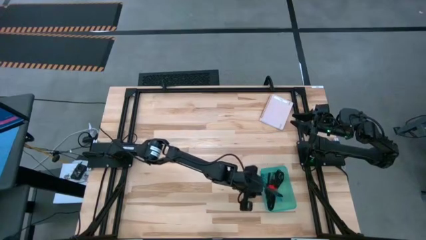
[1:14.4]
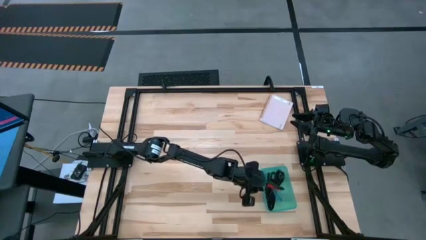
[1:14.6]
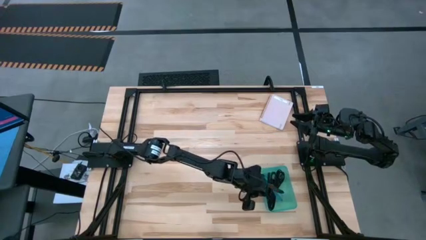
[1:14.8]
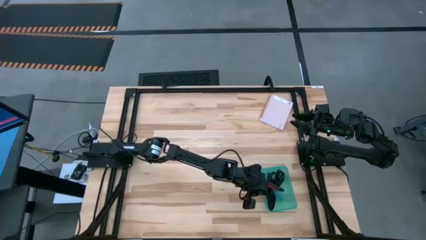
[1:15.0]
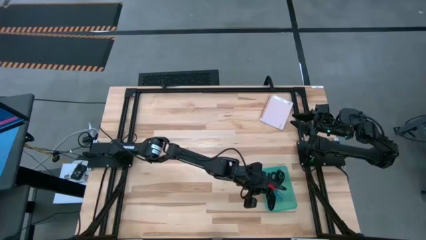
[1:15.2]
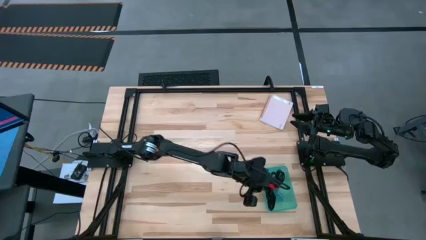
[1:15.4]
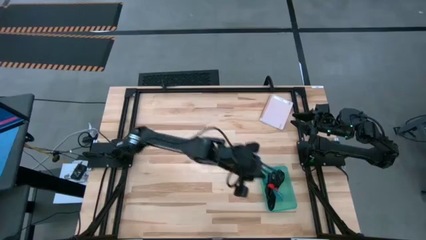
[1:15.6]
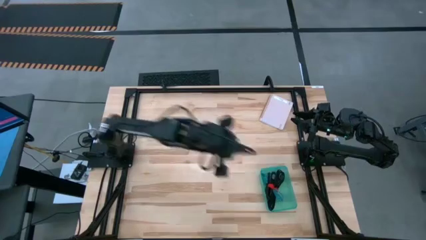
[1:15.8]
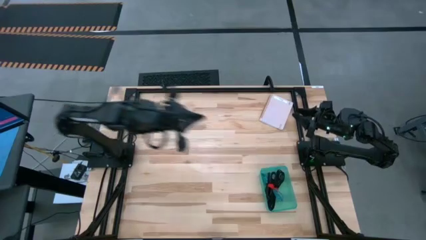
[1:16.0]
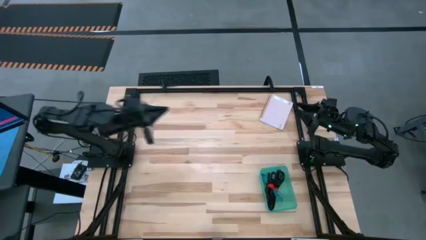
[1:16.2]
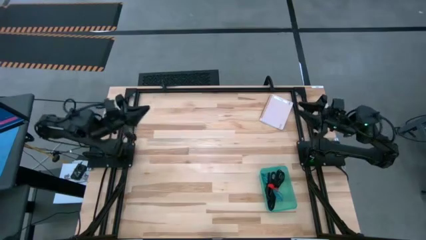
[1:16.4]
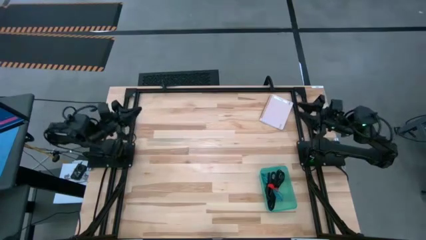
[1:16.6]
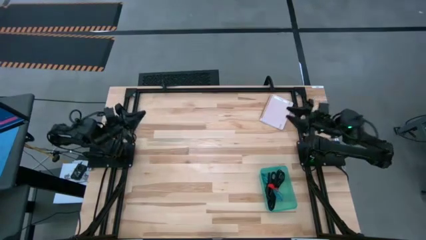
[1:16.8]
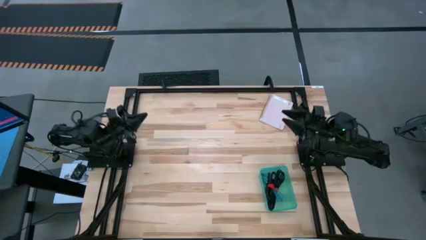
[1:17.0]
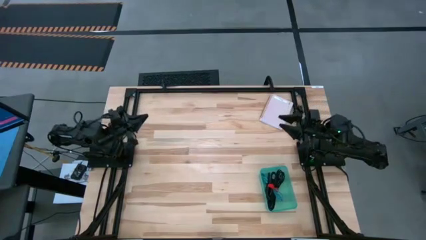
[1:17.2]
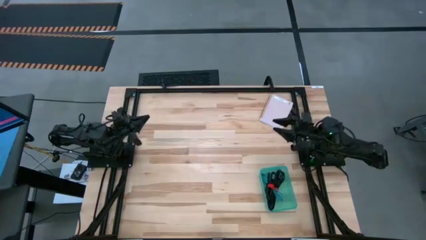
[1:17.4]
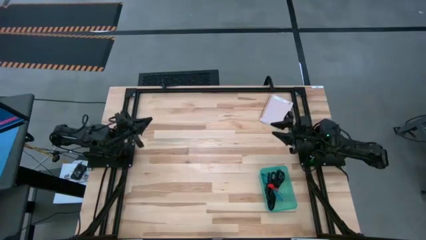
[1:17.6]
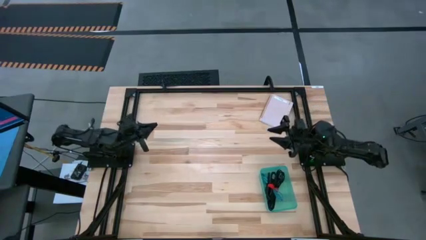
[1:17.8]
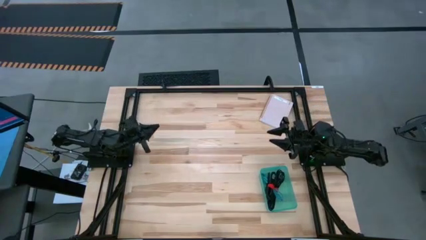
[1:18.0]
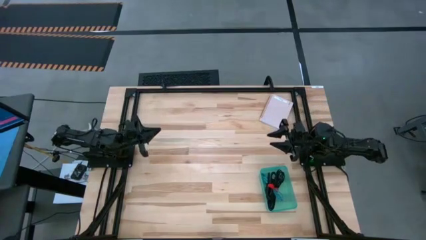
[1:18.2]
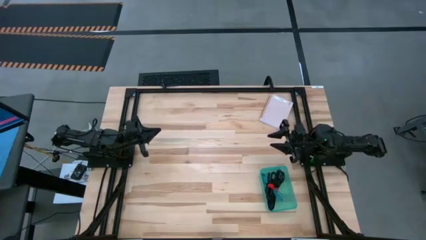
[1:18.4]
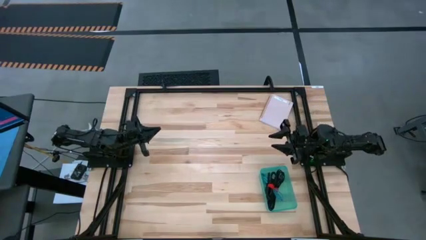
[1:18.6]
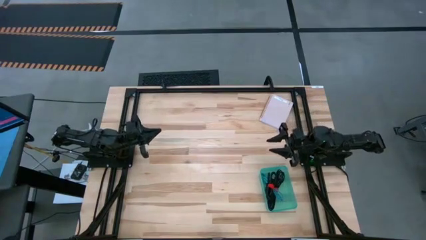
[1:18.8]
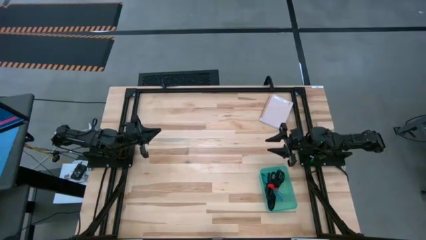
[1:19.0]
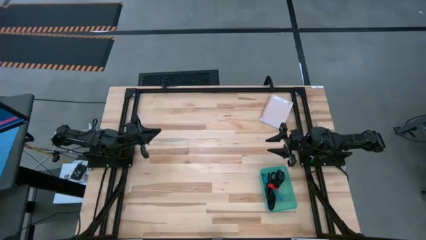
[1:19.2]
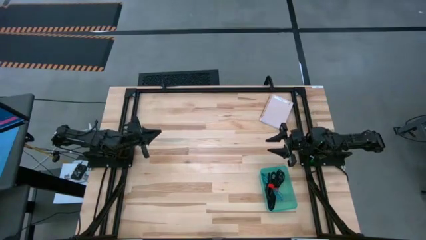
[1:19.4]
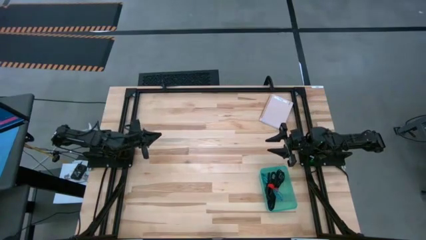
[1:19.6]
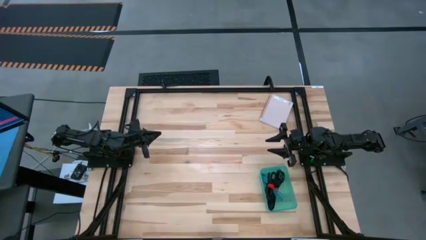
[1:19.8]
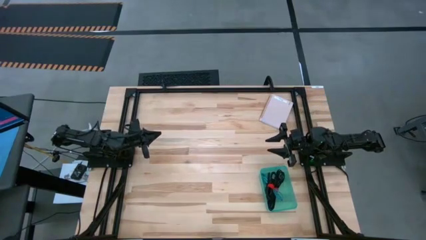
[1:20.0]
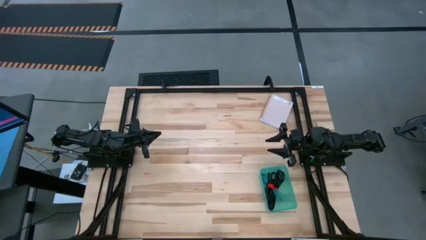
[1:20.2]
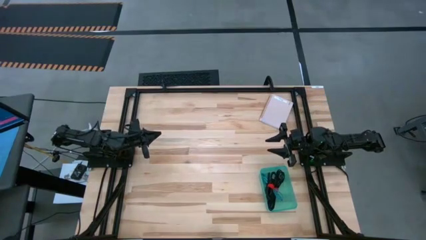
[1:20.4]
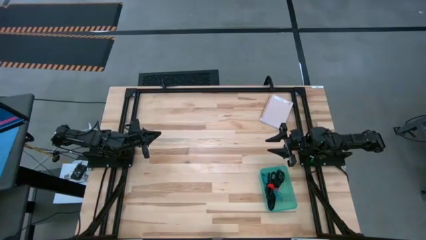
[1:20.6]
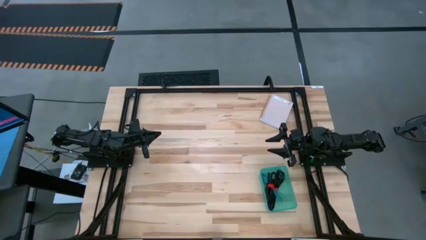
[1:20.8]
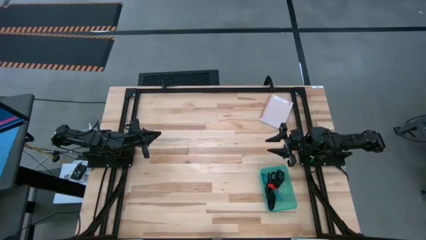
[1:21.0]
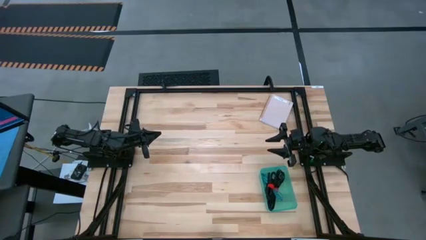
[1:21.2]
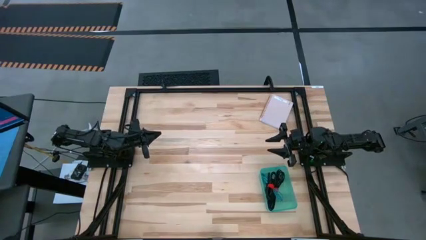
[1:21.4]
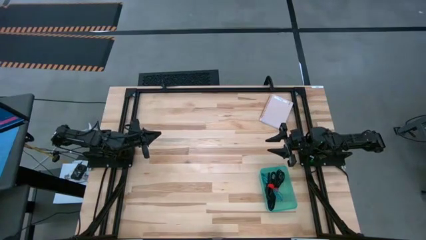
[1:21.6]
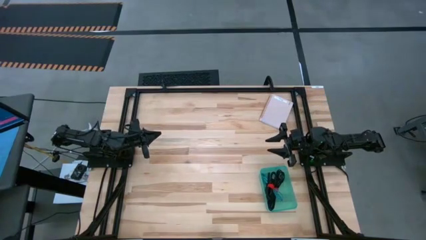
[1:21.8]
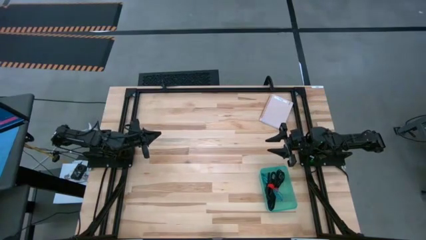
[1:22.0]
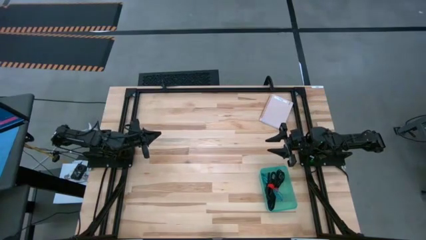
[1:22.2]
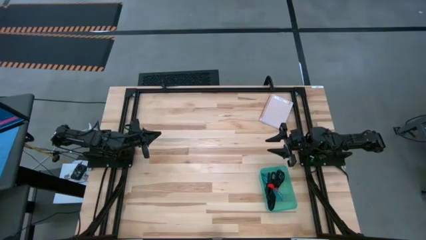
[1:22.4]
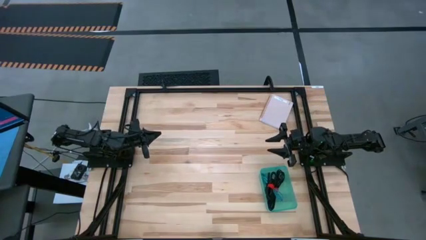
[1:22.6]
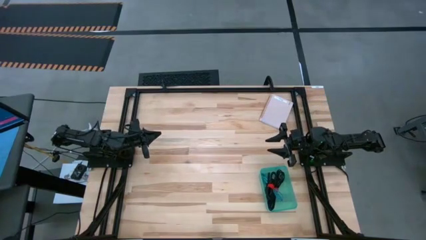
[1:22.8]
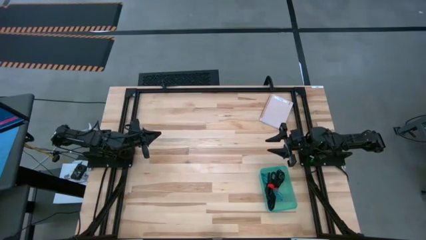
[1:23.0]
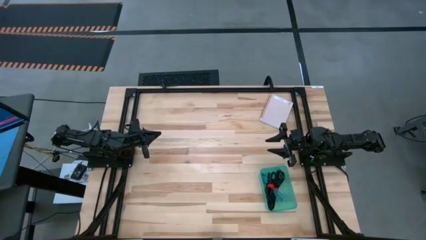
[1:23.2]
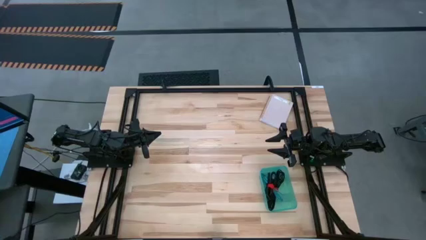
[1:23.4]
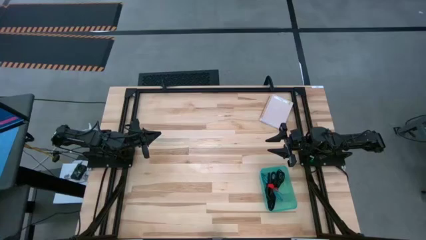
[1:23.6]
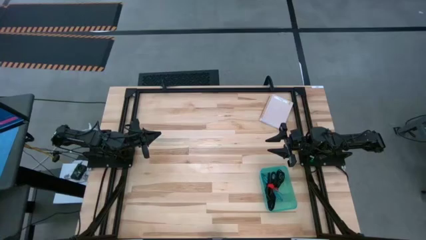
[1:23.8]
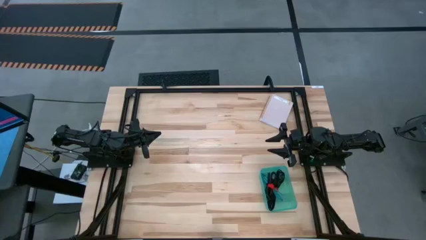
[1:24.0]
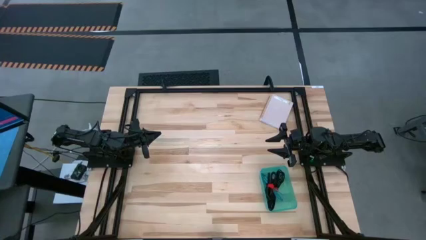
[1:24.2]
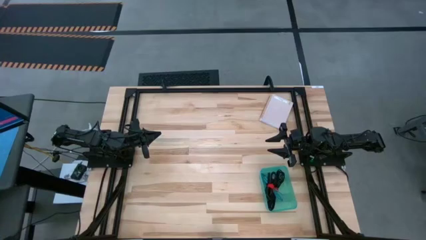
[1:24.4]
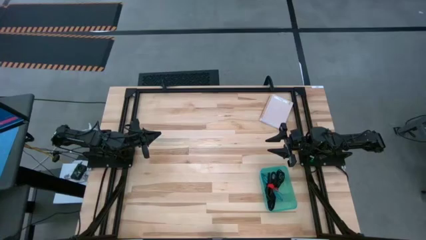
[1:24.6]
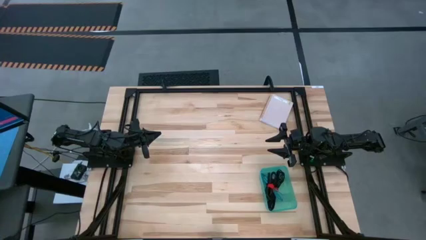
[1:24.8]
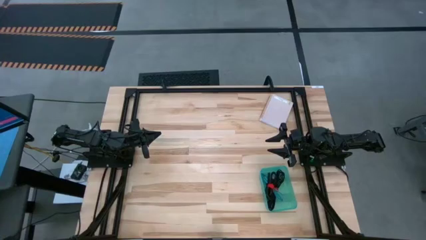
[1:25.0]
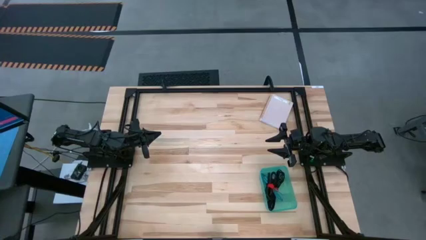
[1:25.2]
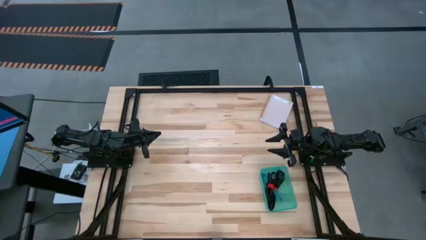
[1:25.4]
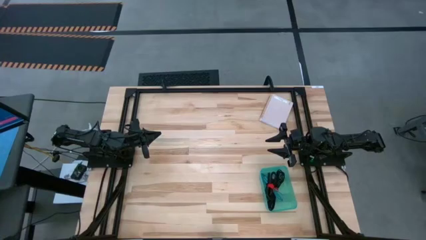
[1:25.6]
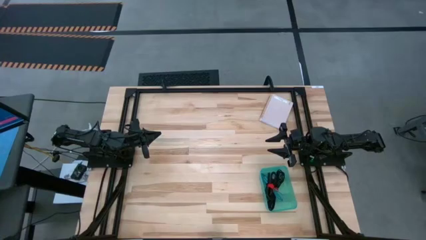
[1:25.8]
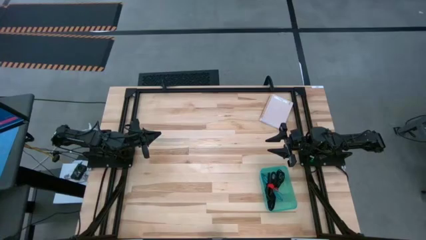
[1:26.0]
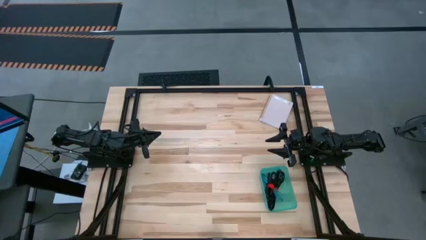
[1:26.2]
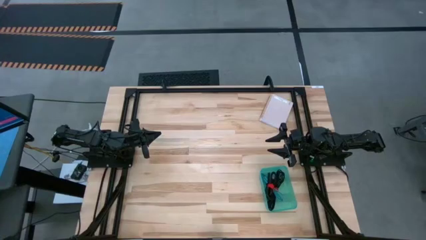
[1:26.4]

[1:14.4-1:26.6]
Task: Pick and place USB-C Cables
Return to Home Position

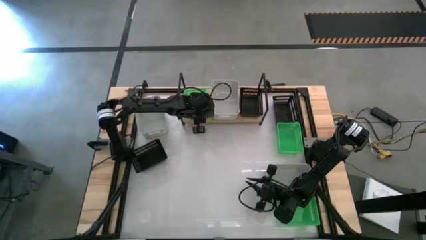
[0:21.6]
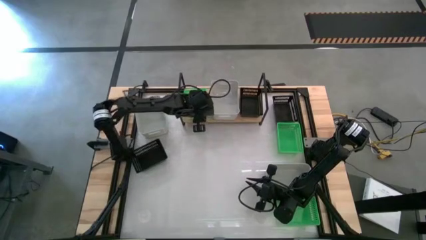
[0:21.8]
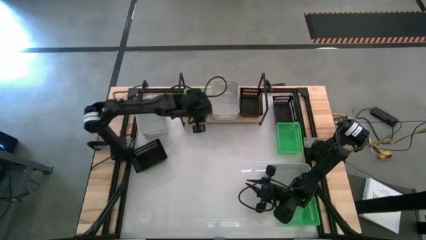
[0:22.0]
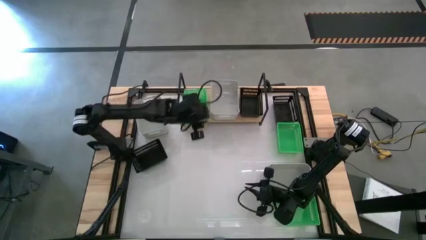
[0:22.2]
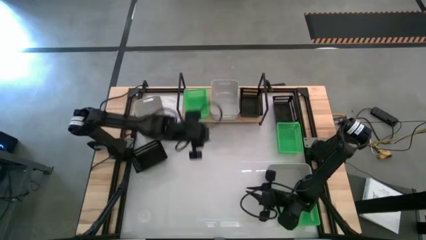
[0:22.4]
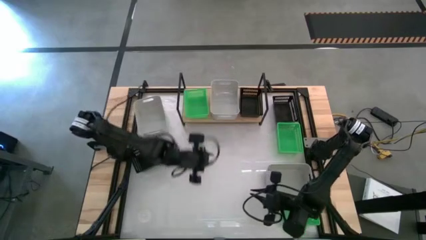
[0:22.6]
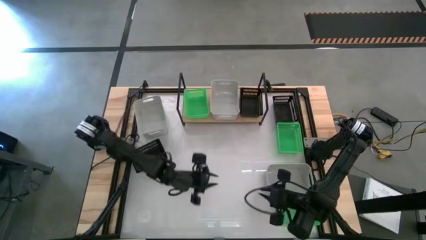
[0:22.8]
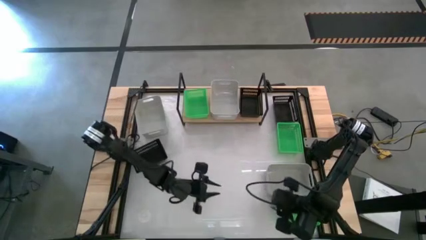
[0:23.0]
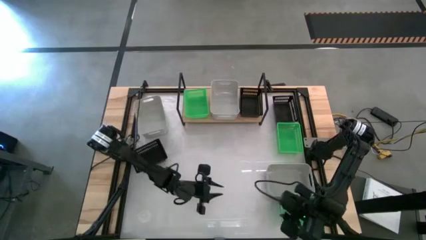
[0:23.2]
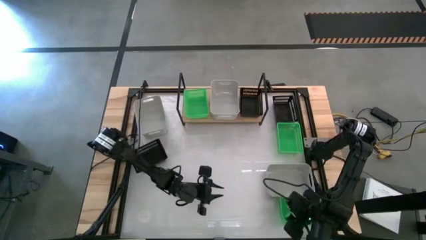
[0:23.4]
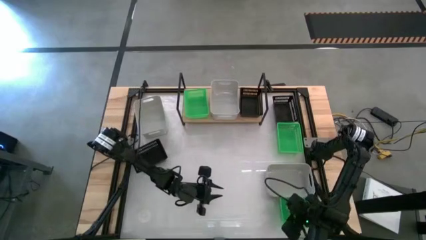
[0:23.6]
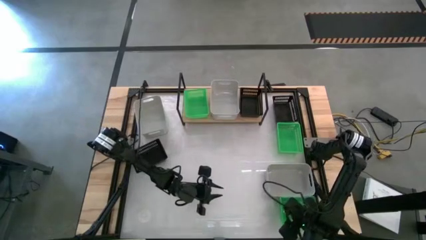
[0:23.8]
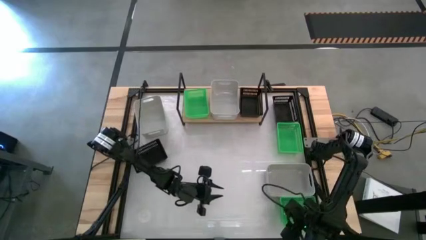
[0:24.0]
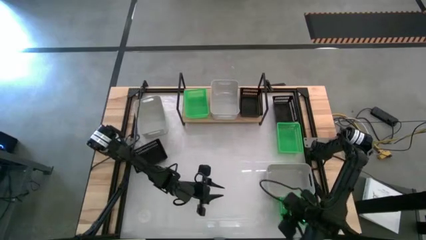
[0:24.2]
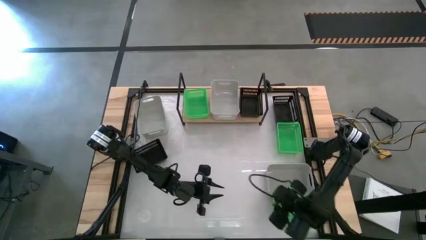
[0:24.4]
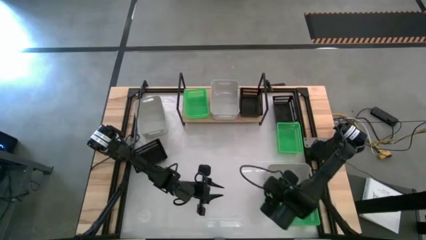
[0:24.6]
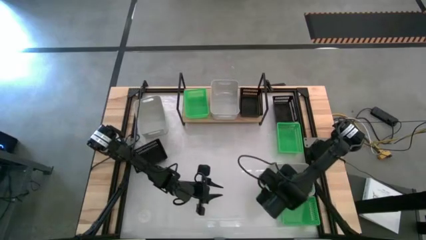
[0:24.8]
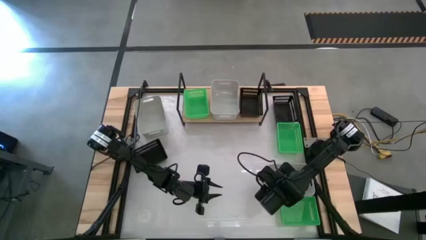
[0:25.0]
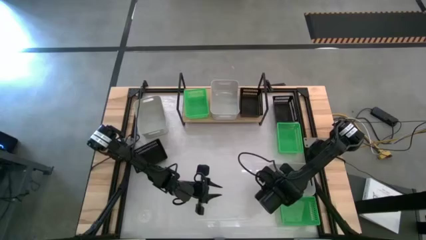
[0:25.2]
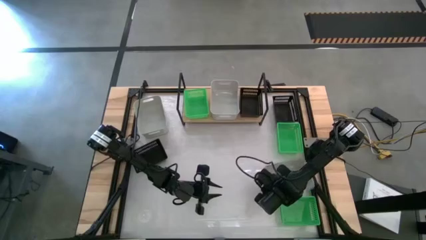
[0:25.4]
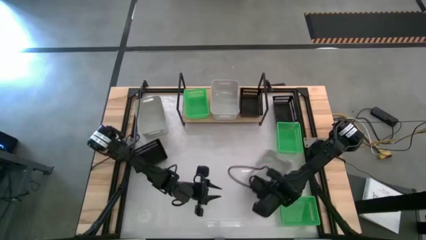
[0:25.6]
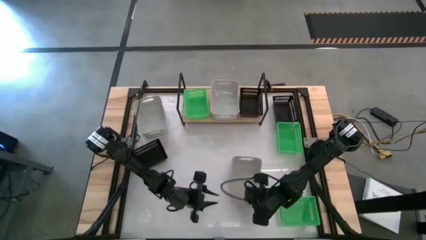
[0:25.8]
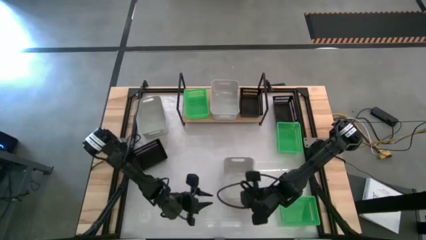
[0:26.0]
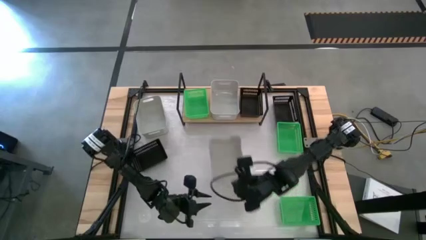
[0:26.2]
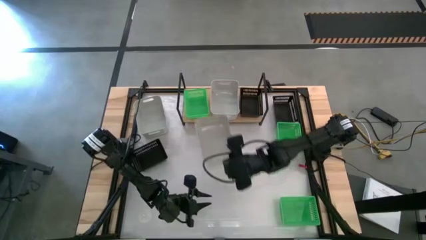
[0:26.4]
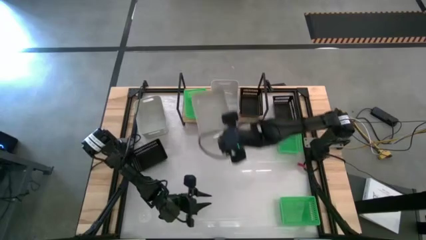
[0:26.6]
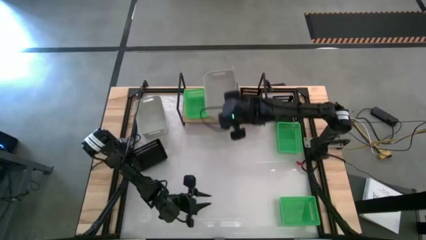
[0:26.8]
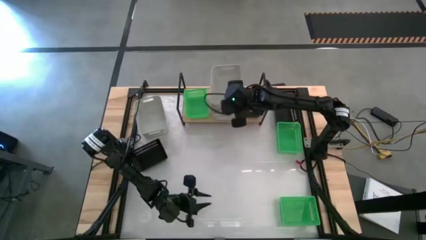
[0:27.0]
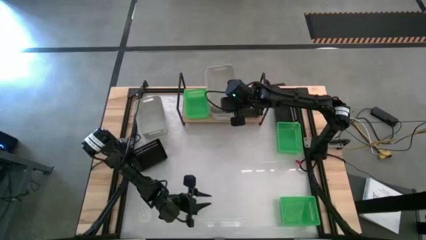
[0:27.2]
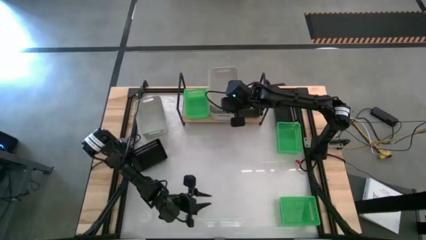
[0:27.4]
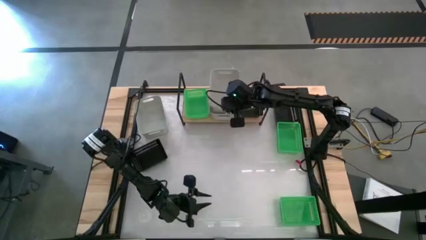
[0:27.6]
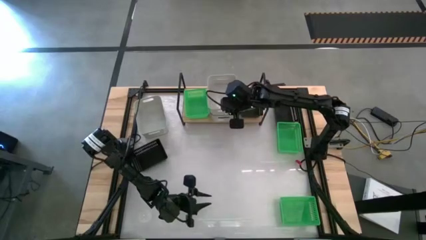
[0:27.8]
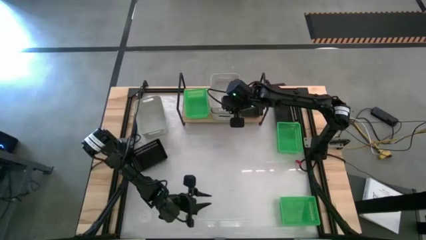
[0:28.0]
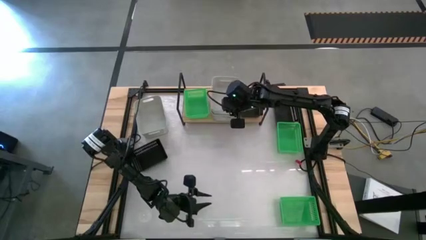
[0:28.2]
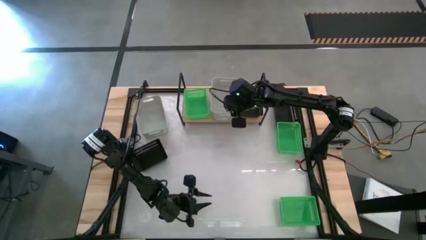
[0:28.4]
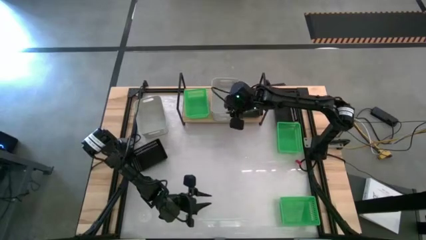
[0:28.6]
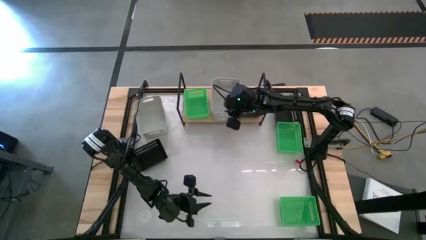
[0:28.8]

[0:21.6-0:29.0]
Task: Stack baskets on shelf by color
Stack the bottom white bin on the white bin on the shelf
